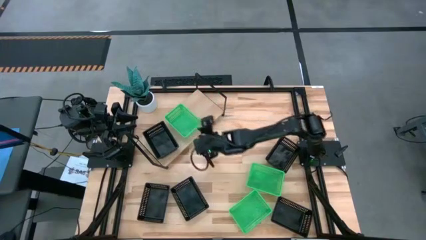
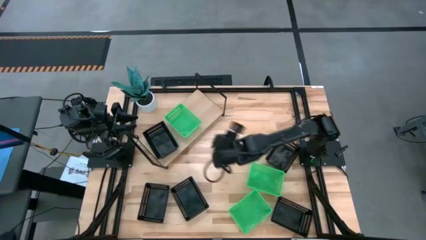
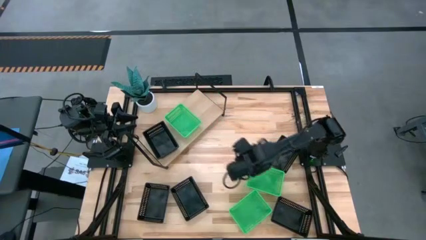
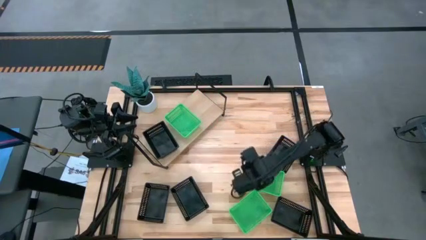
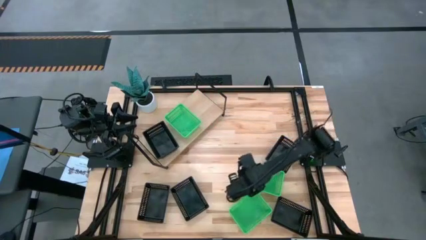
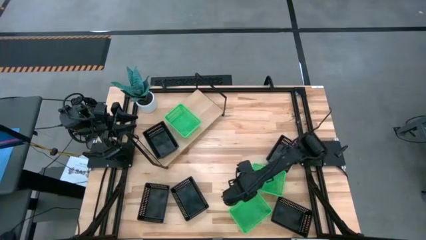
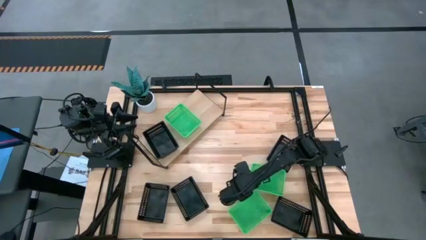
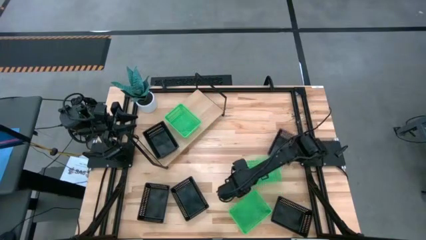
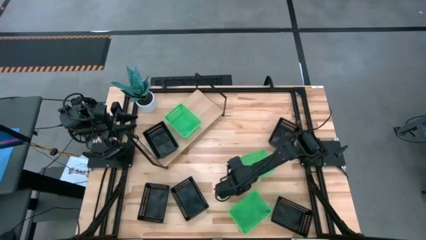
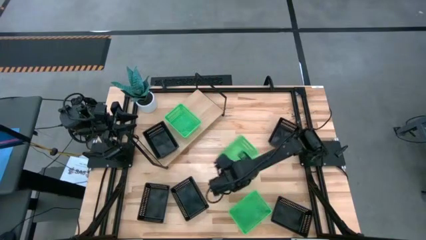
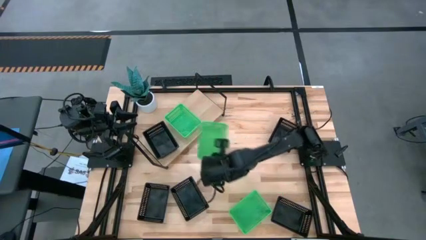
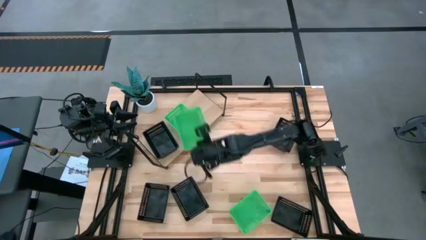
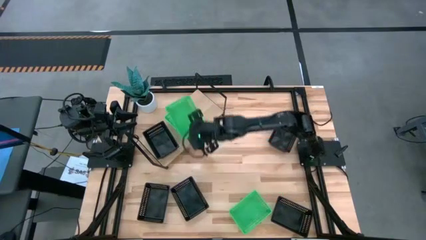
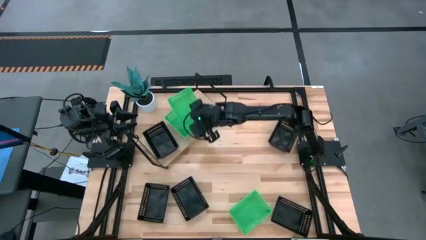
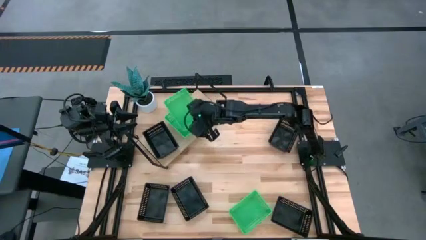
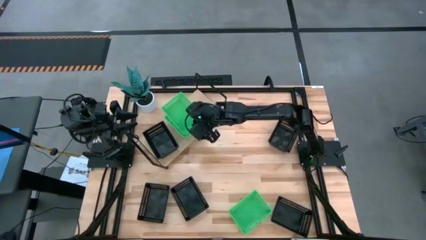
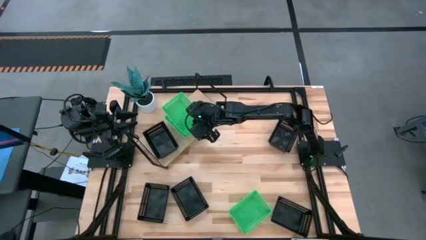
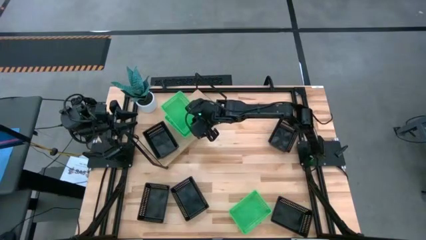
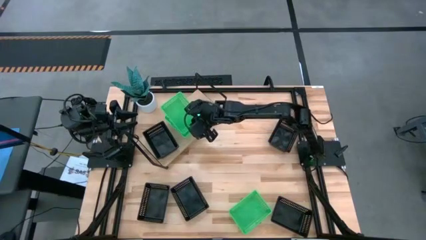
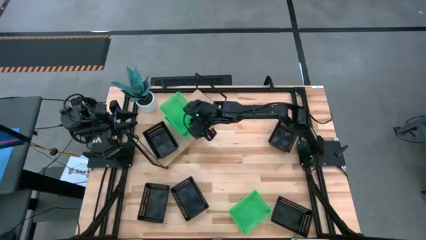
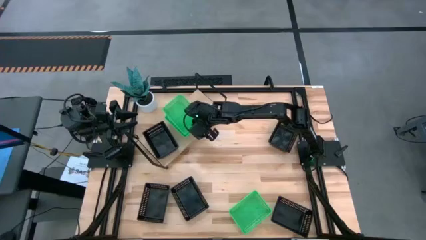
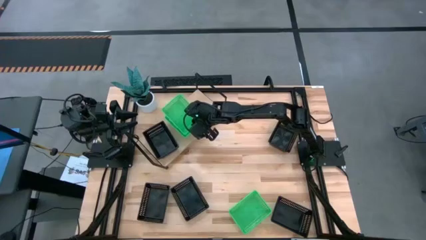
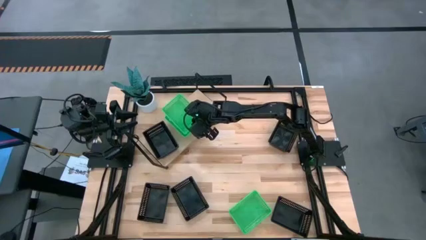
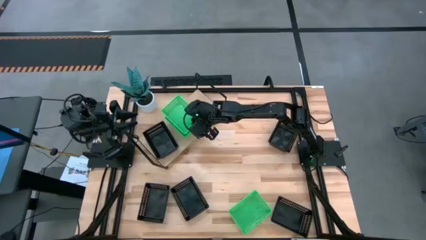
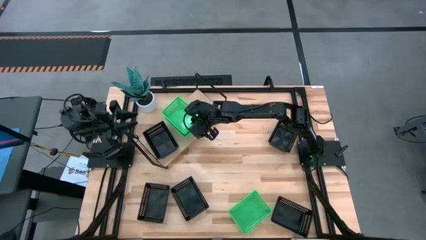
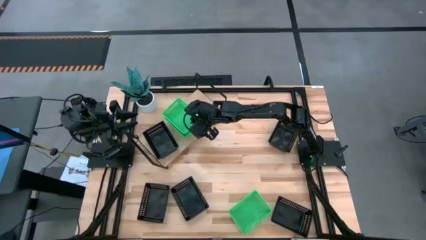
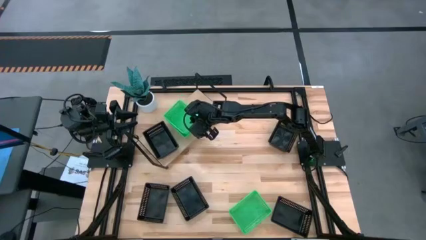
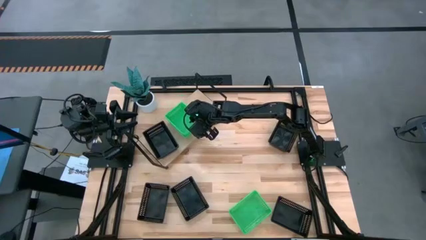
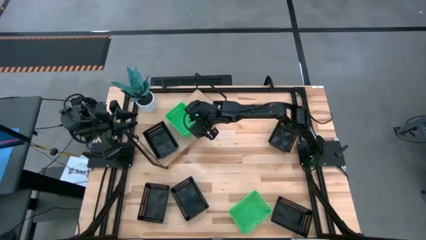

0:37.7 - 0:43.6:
Task: Stack baskets on shelf by color
Stack the green bin on the top of the green bin on the shelf

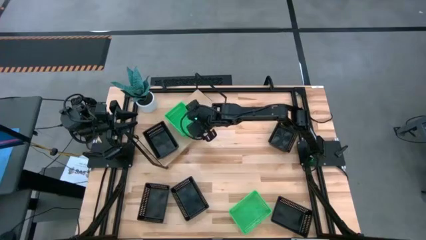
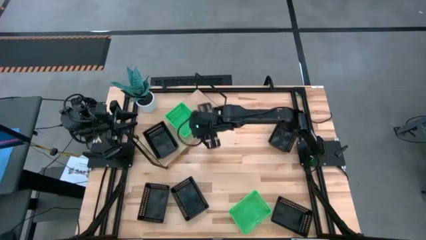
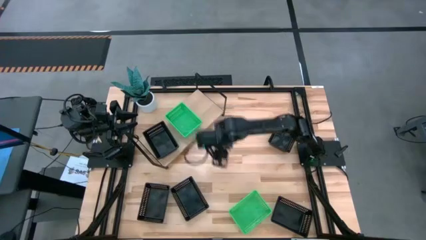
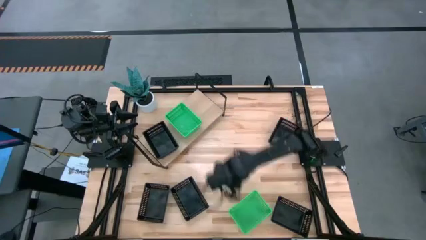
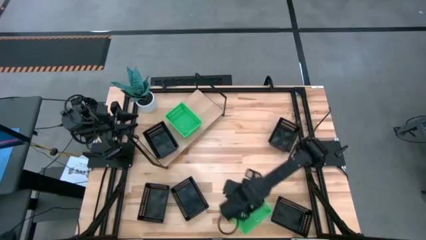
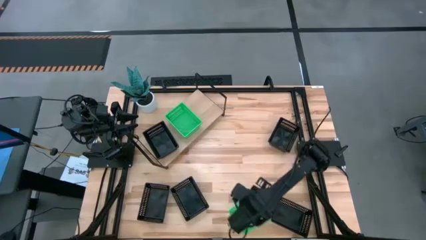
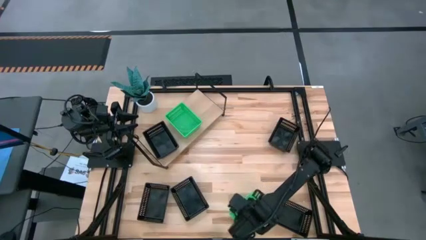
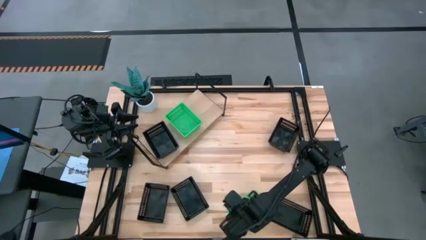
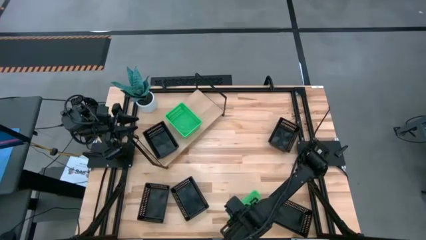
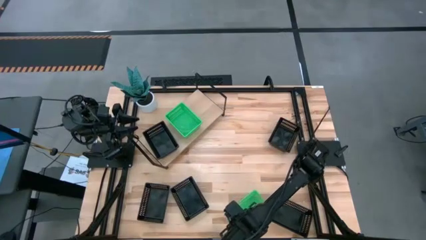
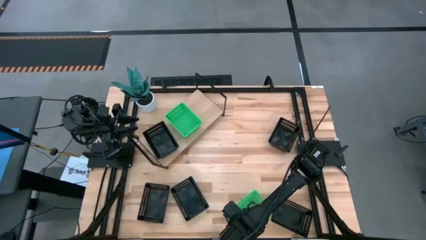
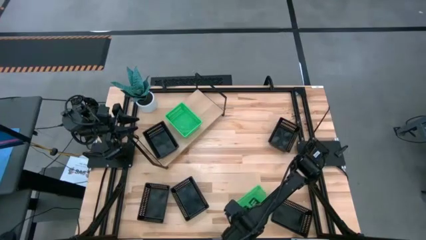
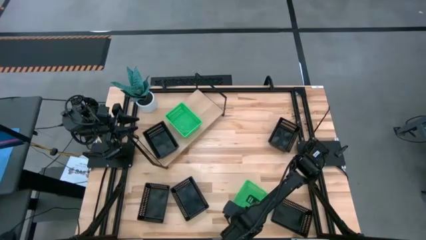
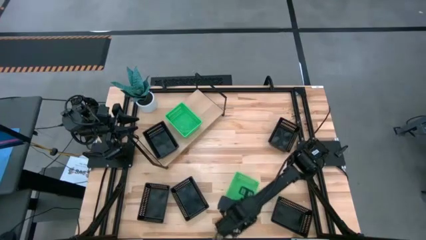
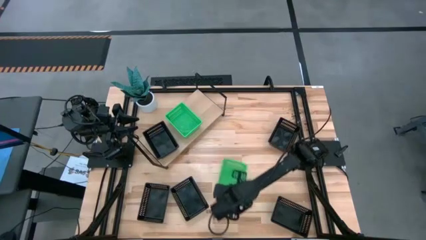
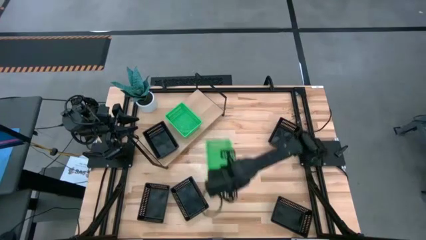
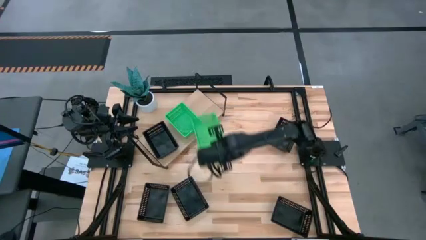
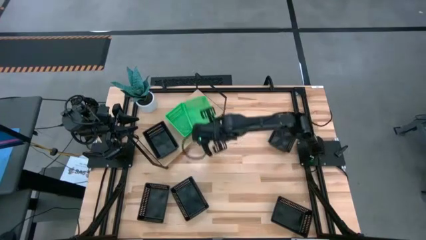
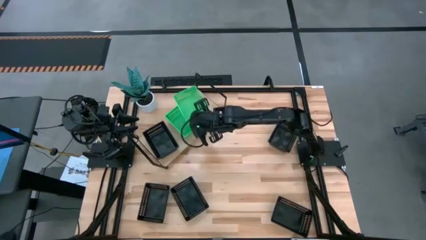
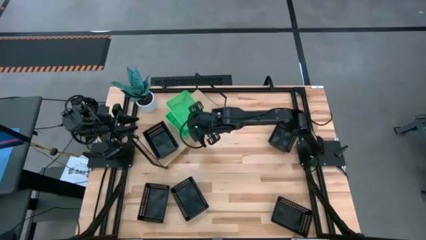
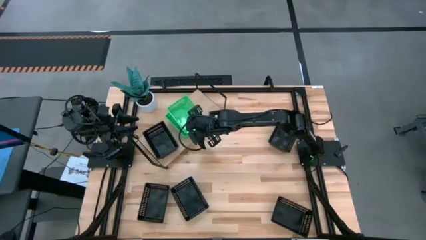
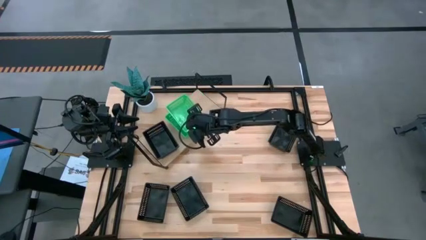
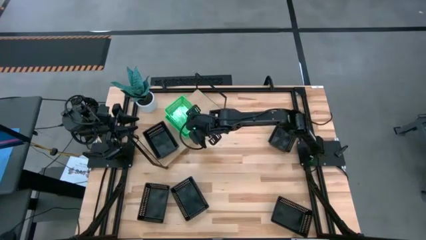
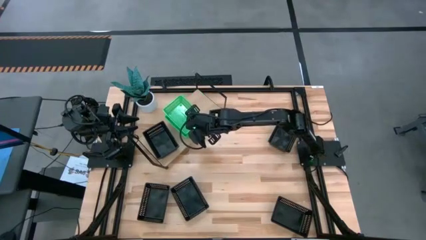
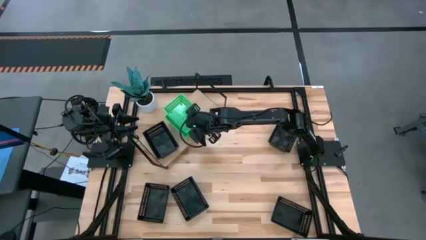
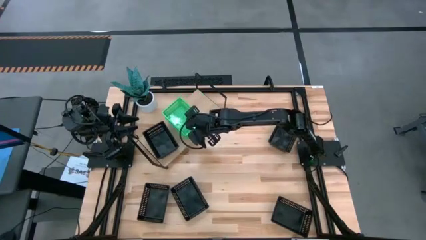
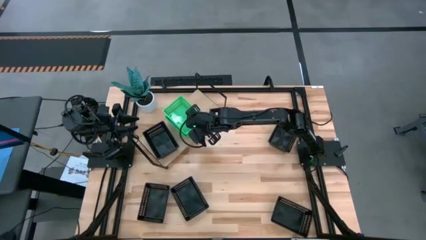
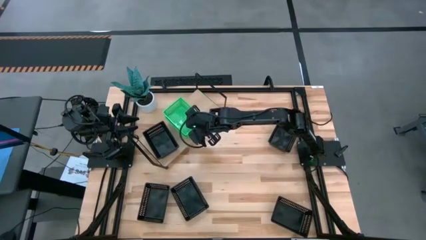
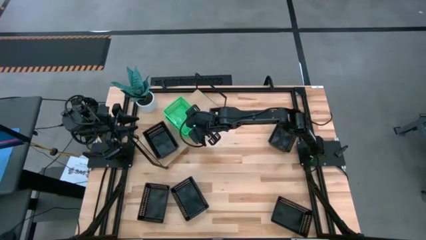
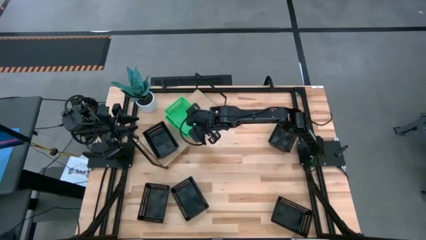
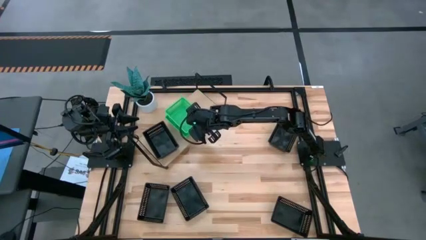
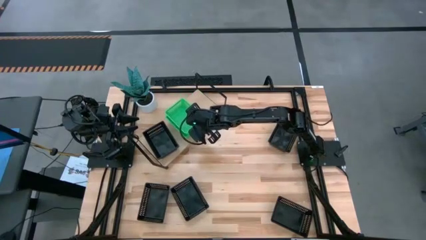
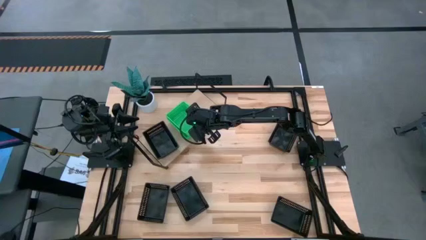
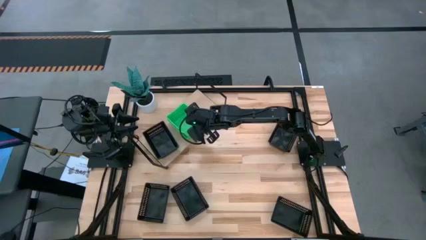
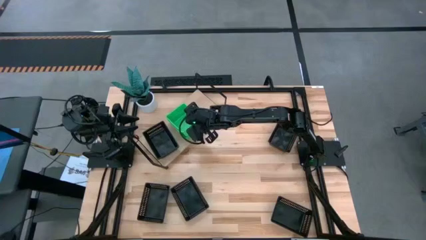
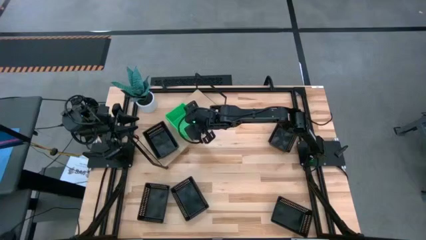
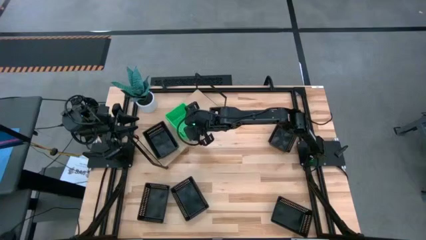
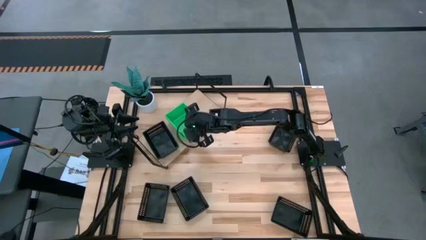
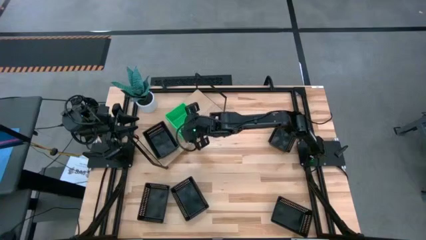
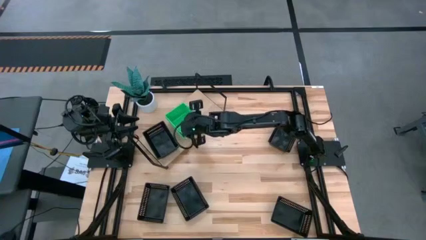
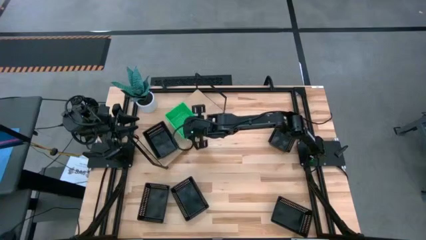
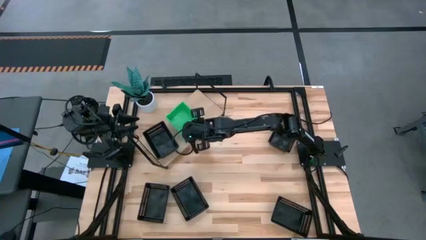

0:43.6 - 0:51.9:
Stack the green bin on the top of the green bins on the shelf
